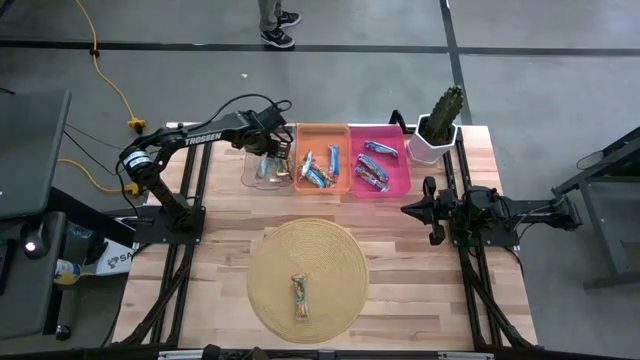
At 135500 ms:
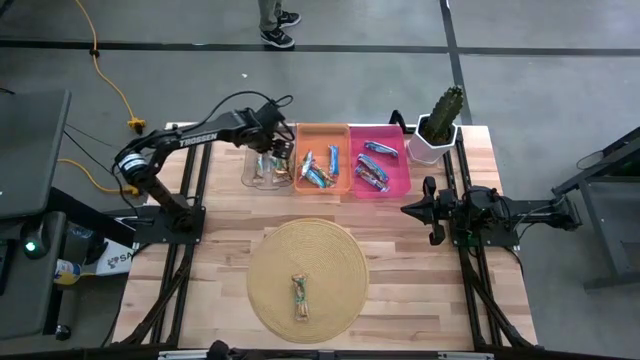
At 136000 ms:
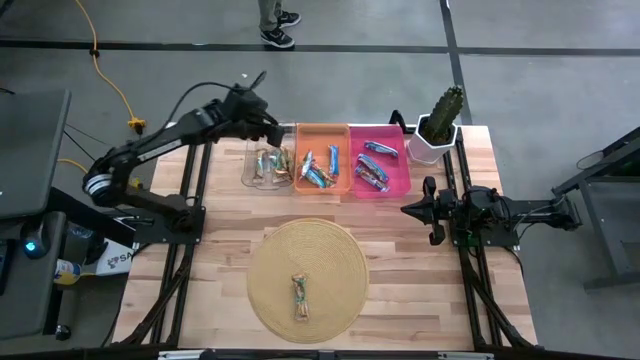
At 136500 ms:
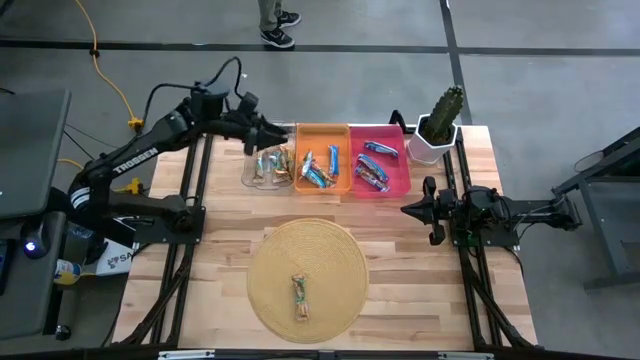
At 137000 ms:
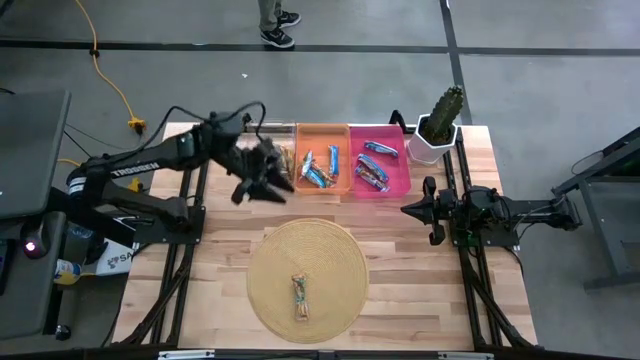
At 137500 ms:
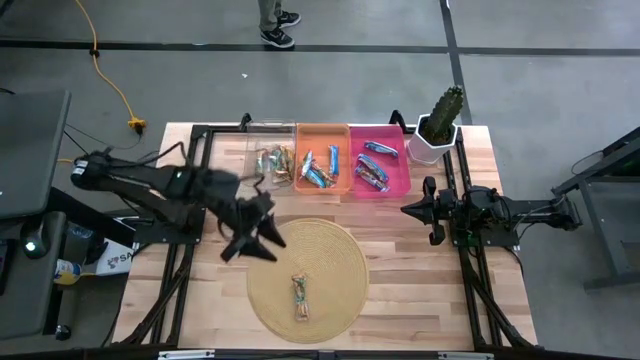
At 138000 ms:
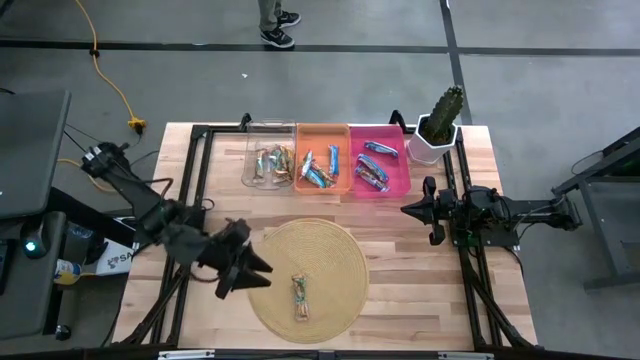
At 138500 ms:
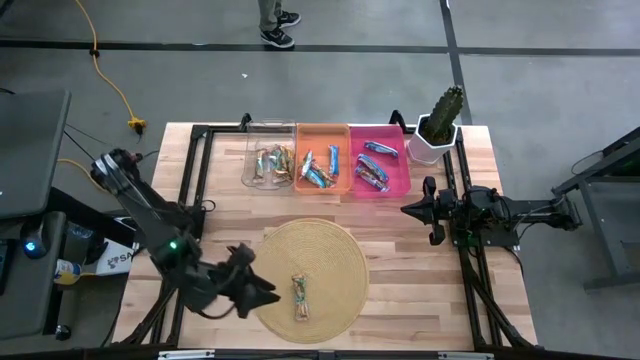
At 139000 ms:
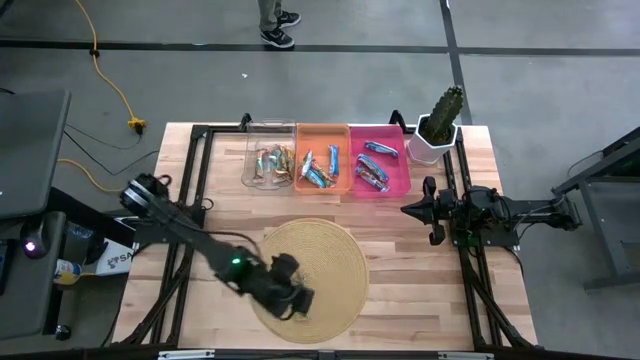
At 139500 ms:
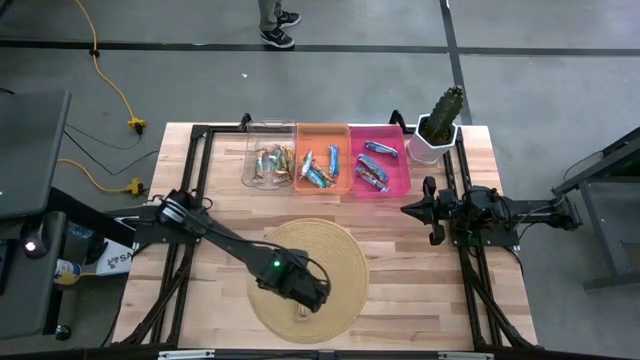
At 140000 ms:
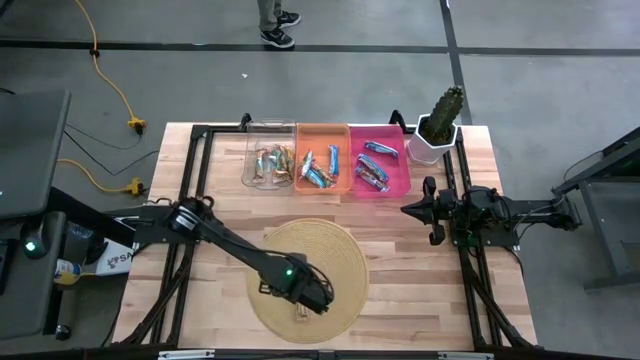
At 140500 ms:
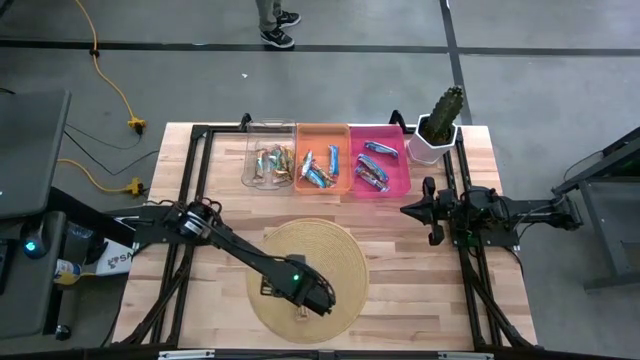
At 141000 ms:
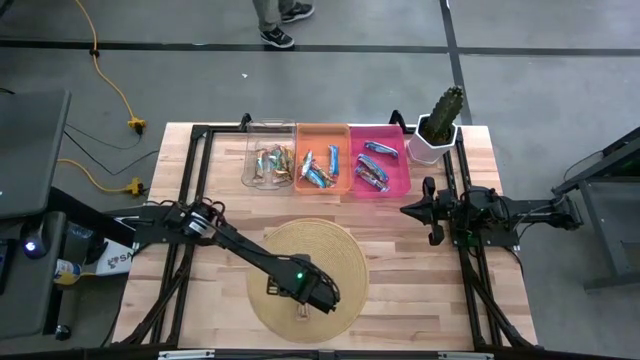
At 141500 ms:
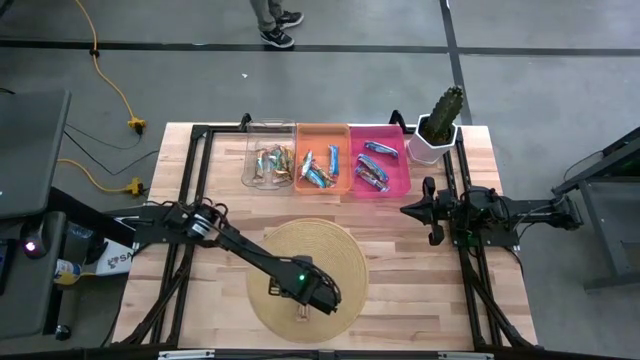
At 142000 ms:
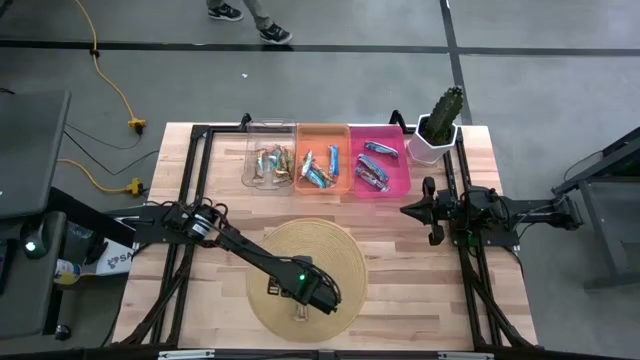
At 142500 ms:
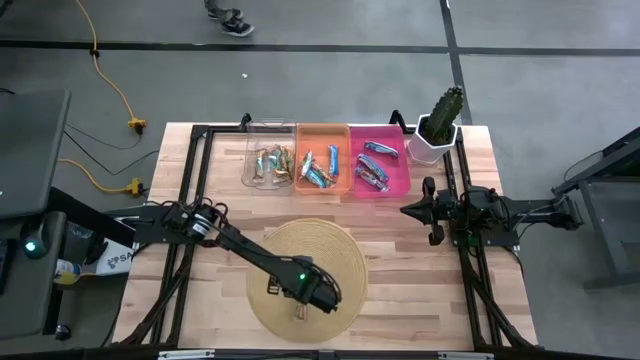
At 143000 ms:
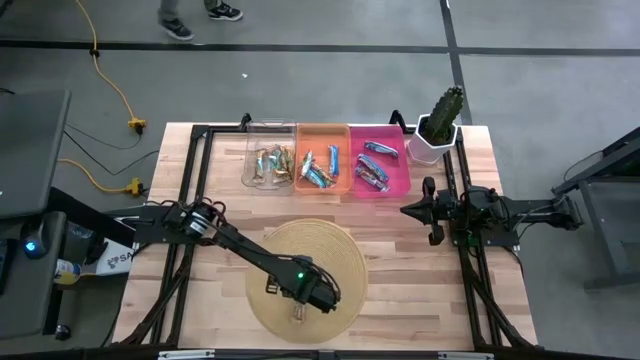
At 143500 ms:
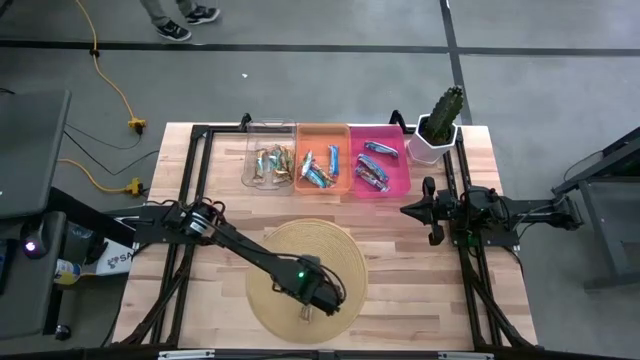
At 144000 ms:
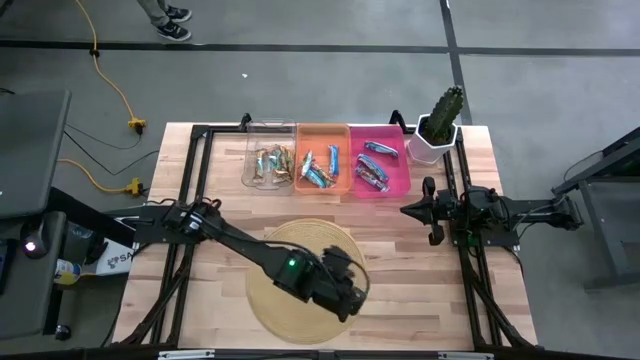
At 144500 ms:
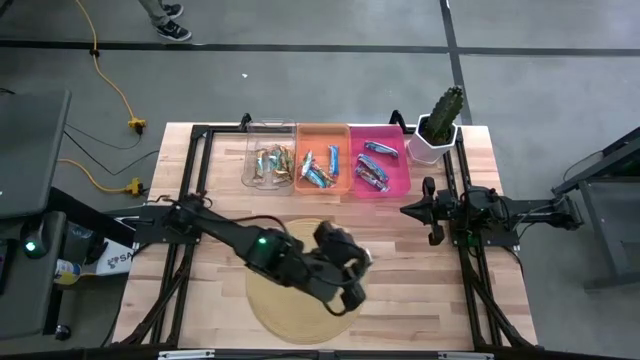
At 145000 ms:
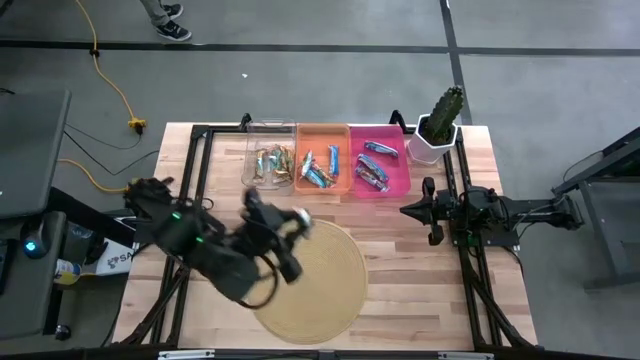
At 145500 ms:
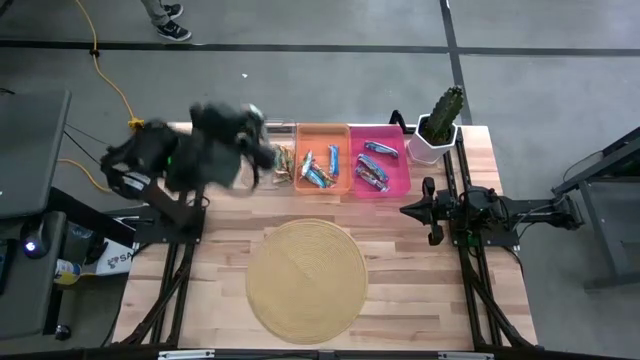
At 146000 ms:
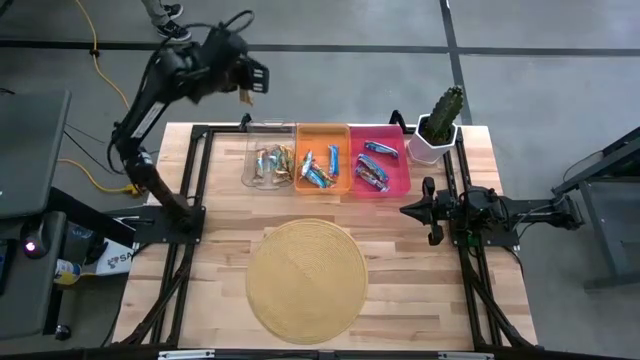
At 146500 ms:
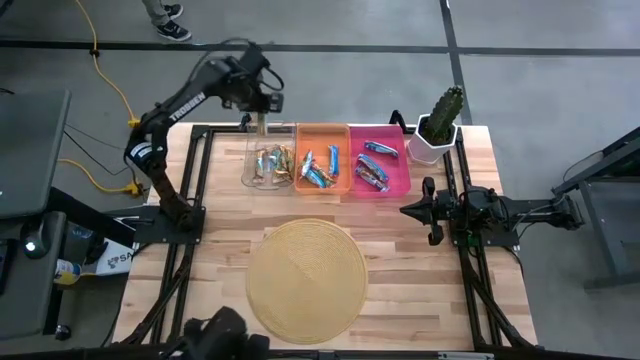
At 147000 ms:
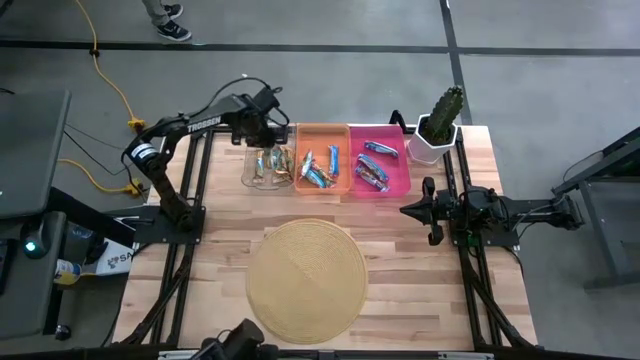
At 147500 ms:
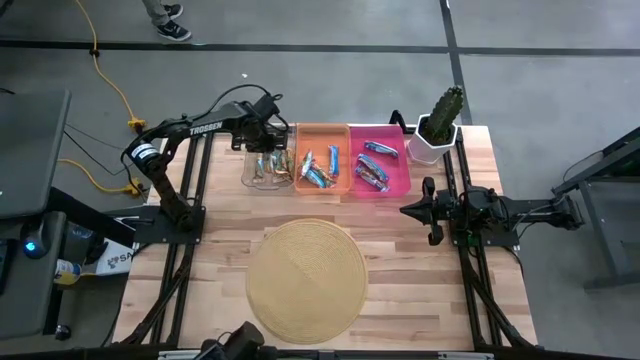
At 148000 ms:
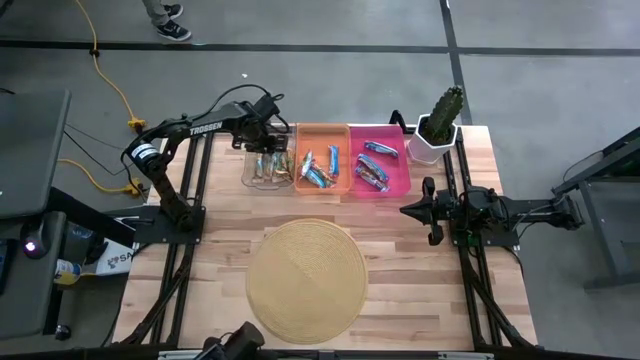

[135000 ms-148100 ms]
Task: Pick and place Granola Bars by type
Put the yellow granola bar into the transparent bin

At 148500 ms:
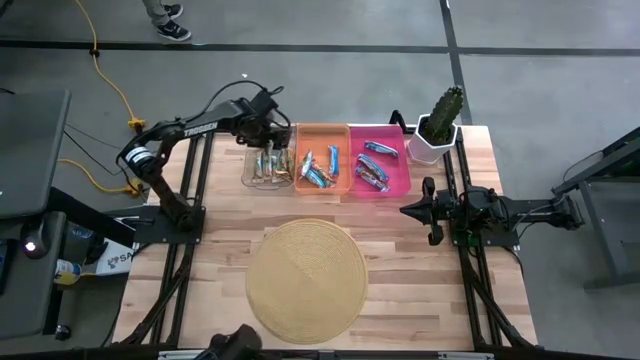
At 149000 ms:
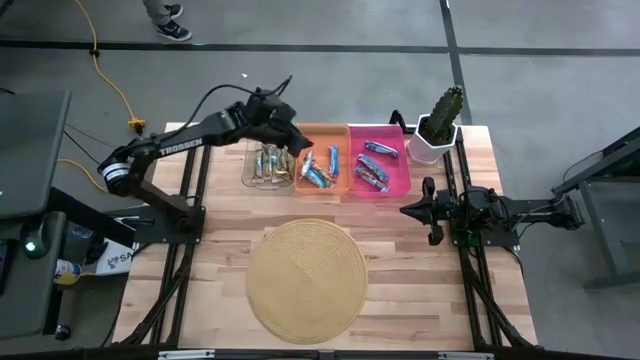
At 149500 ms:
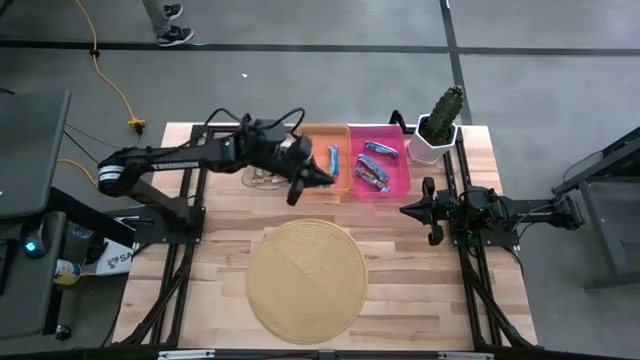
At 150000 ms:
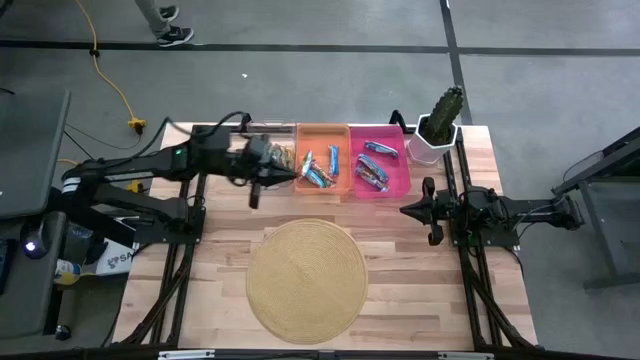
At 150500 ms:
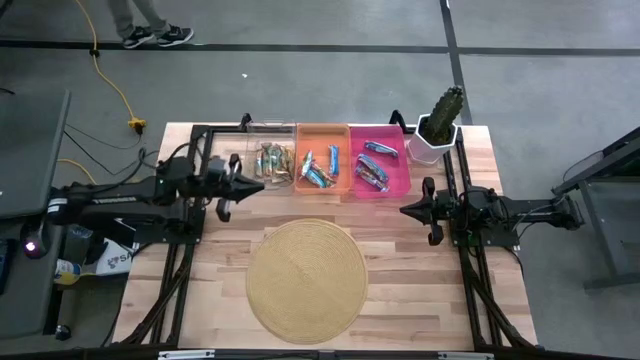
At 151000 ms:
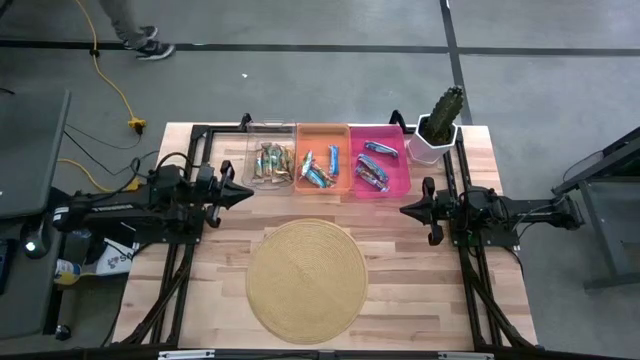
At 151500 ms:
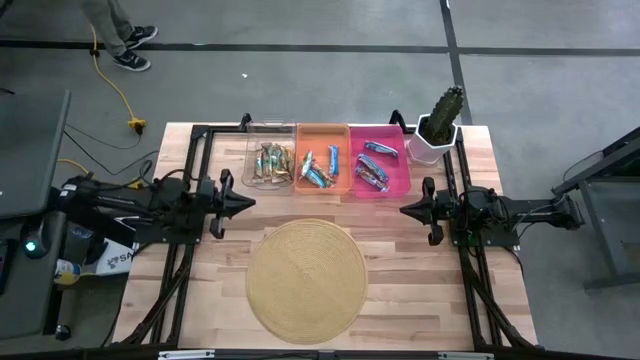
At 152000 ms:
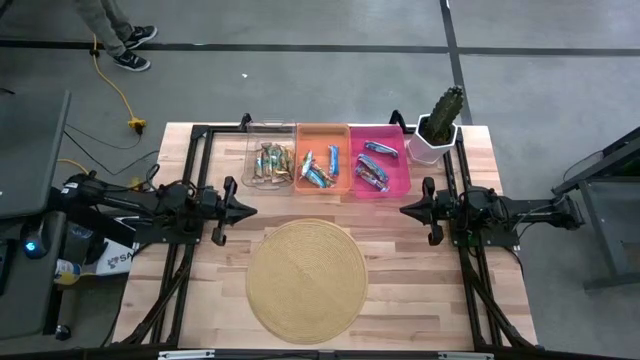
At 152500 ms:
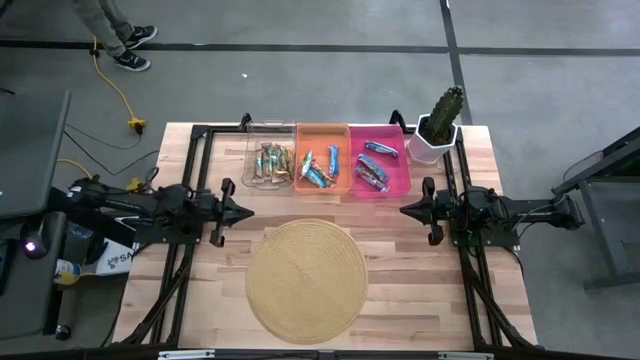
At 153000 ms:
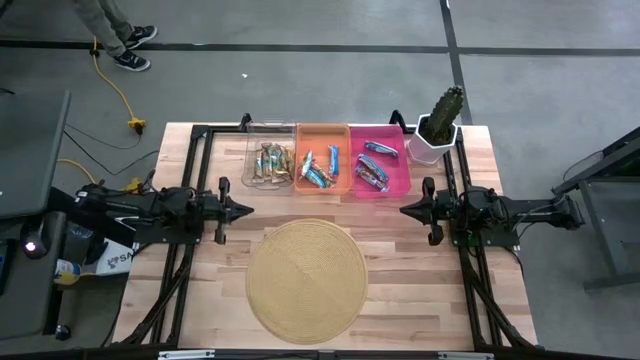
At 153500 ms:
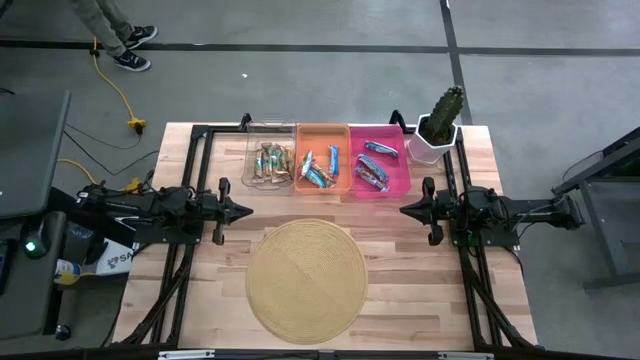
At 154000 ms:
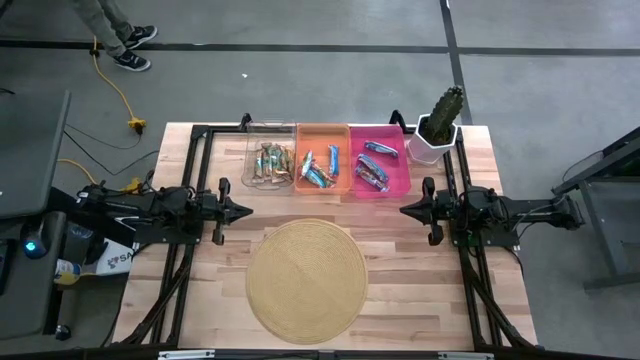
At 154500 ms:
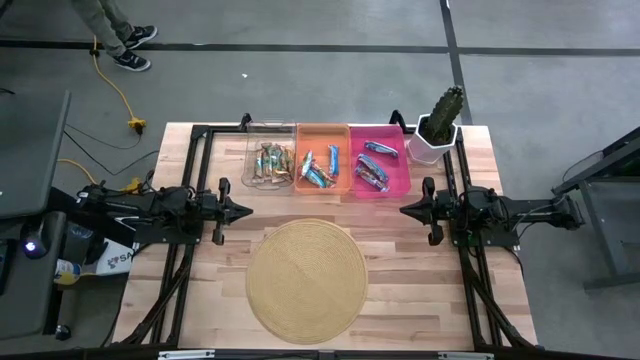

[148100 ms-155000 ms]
Return to Home Position
